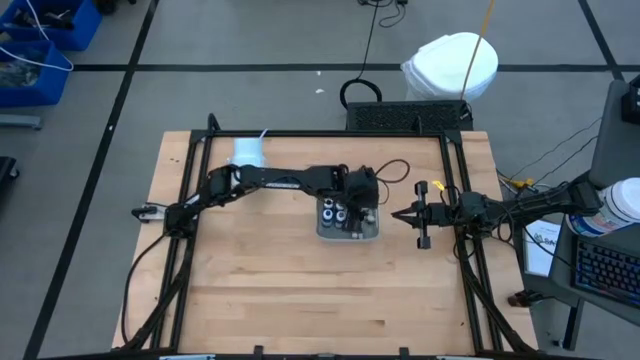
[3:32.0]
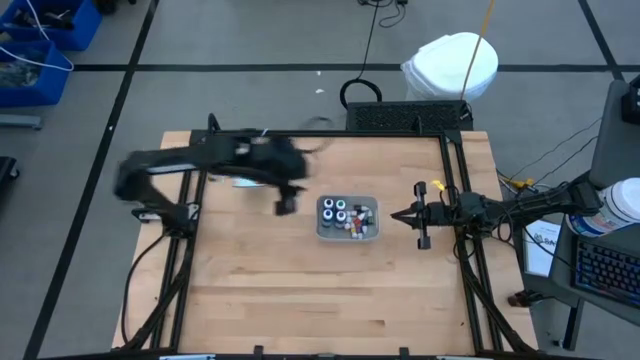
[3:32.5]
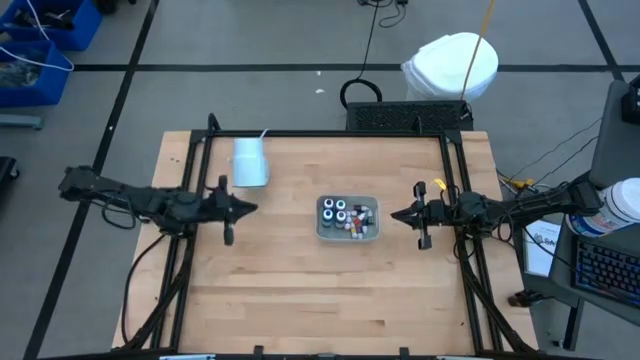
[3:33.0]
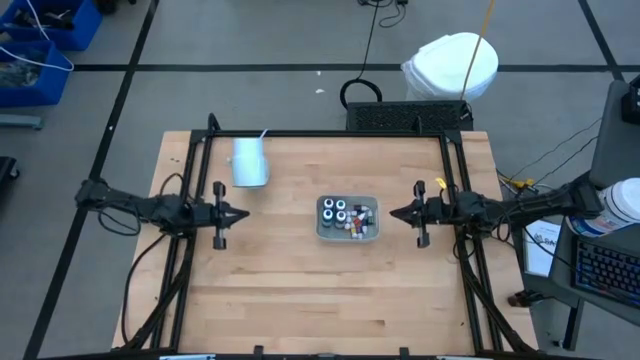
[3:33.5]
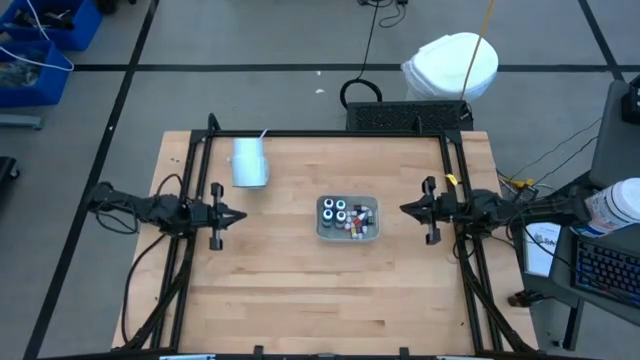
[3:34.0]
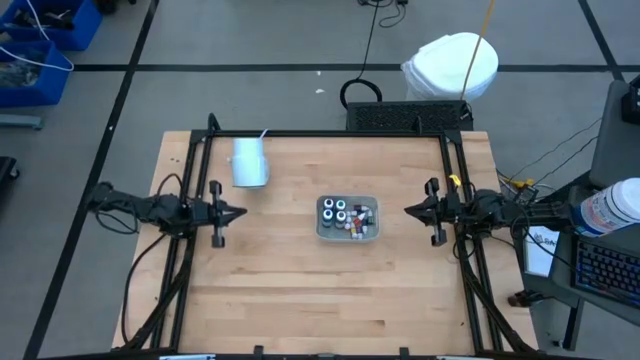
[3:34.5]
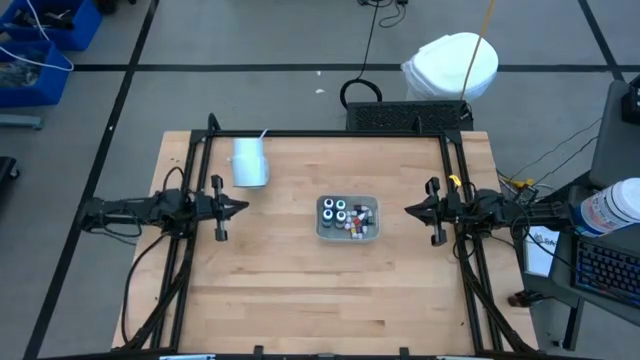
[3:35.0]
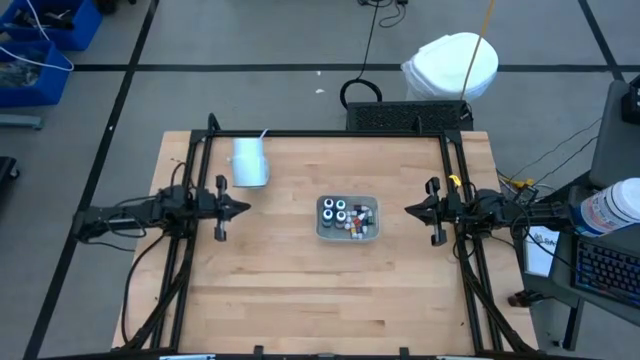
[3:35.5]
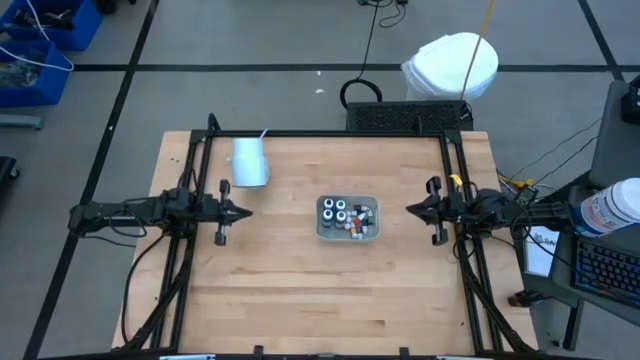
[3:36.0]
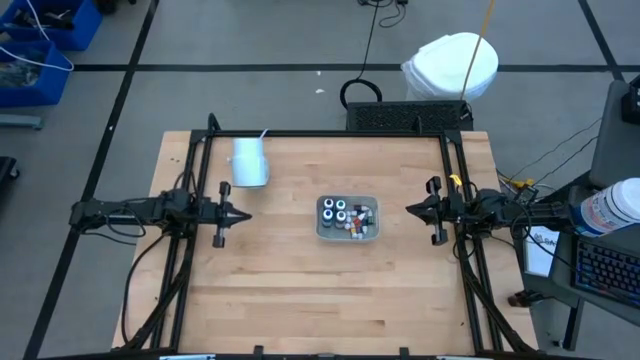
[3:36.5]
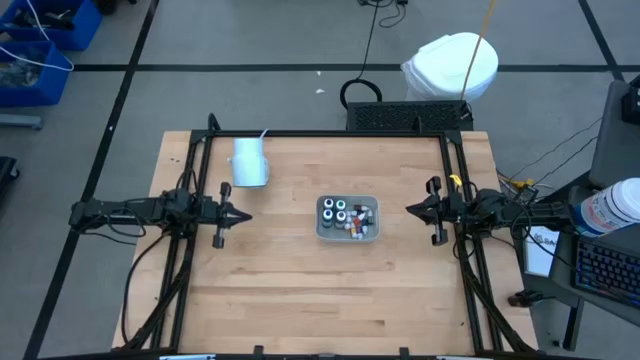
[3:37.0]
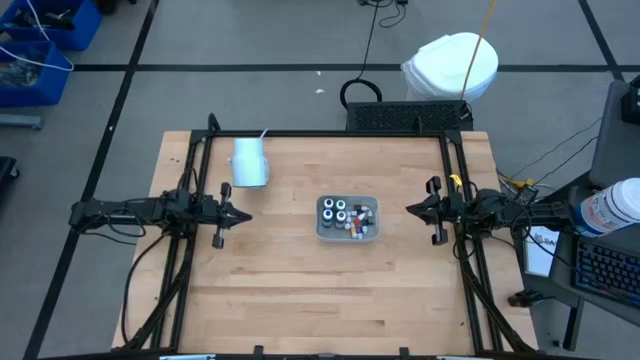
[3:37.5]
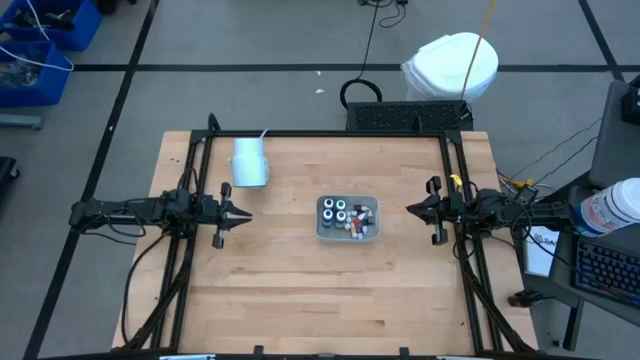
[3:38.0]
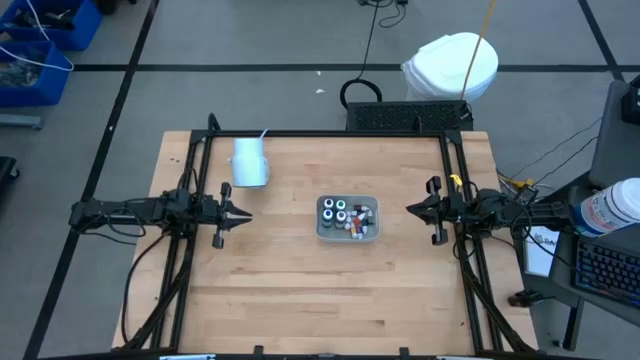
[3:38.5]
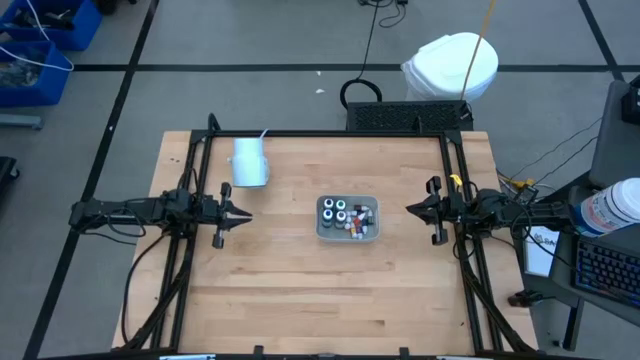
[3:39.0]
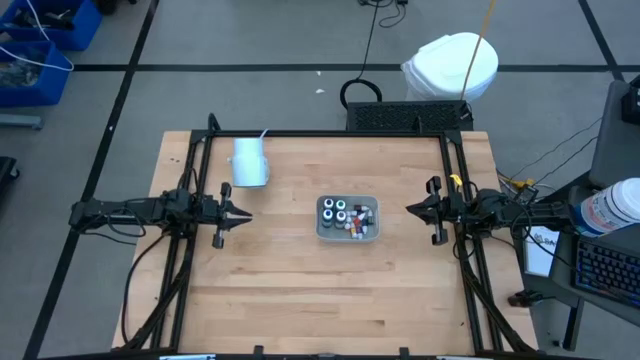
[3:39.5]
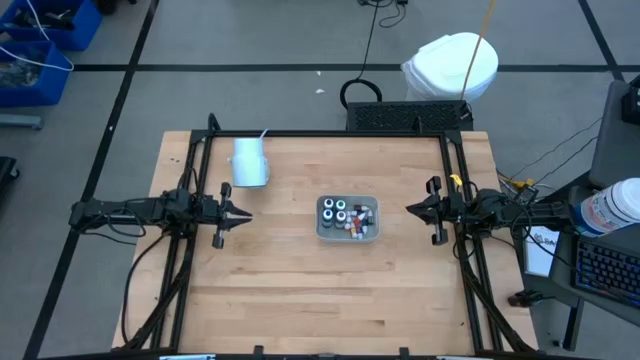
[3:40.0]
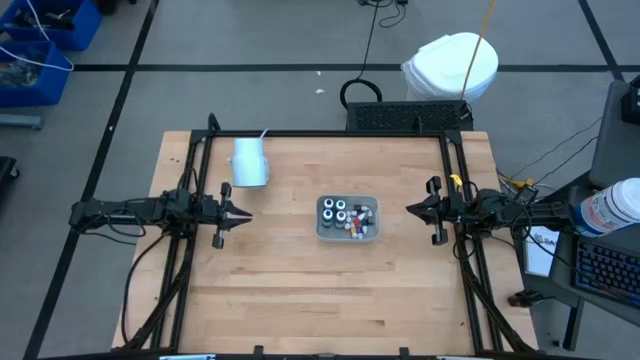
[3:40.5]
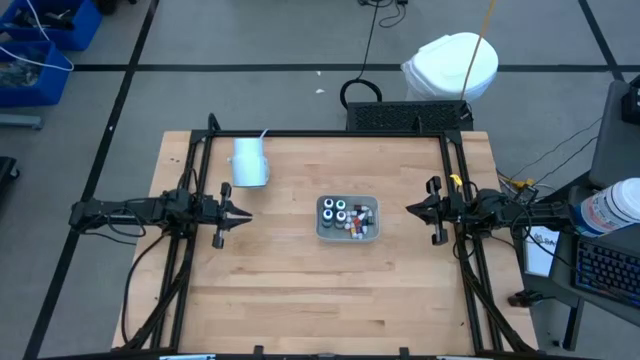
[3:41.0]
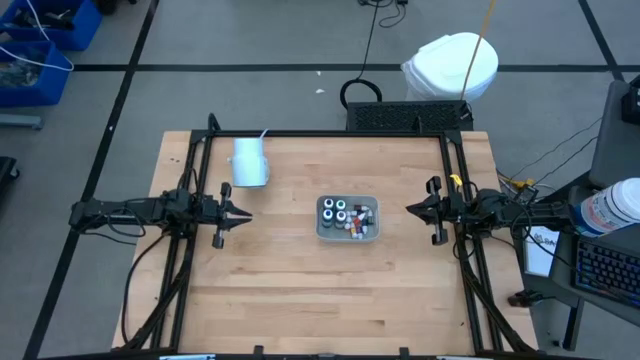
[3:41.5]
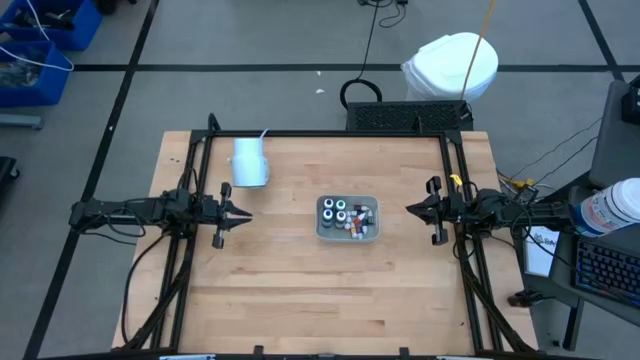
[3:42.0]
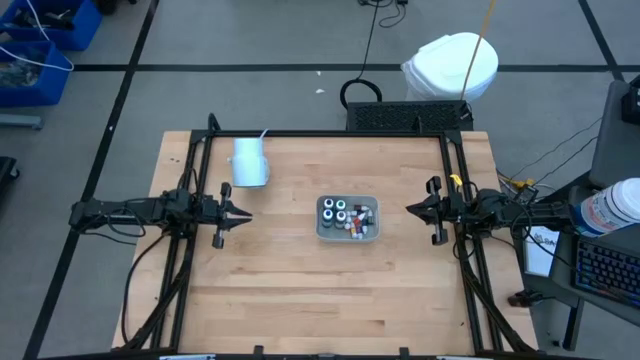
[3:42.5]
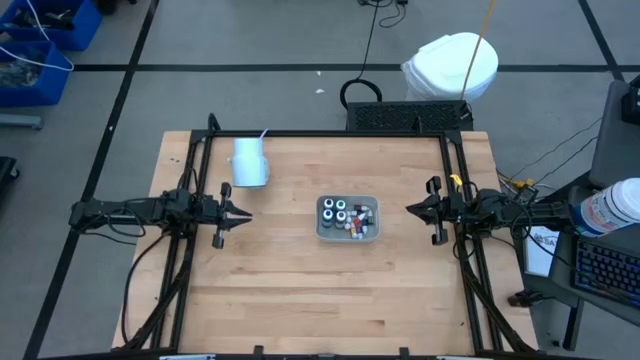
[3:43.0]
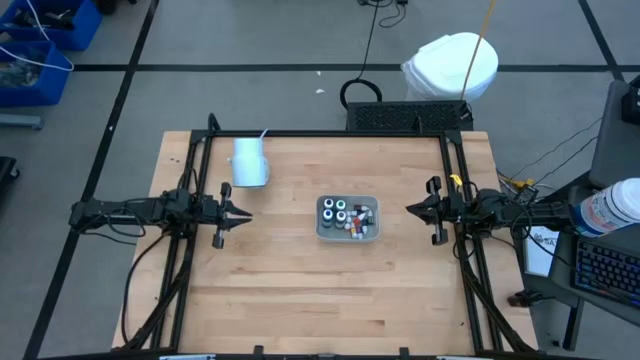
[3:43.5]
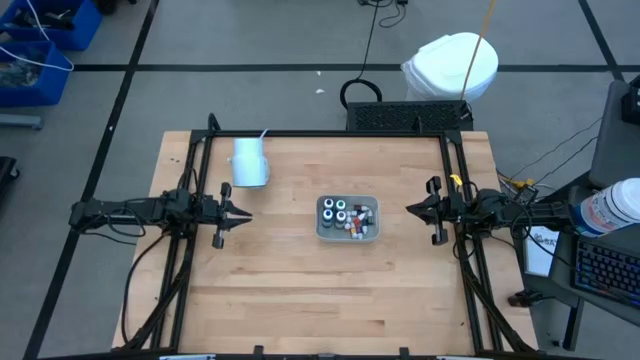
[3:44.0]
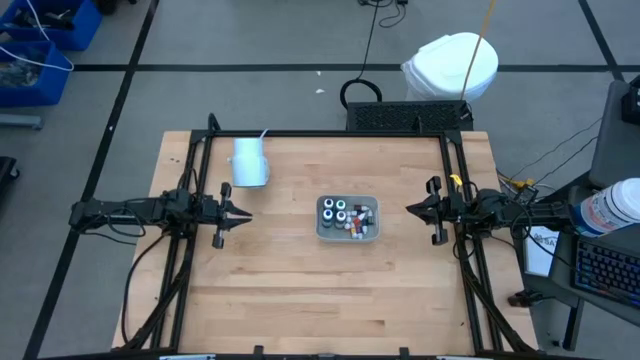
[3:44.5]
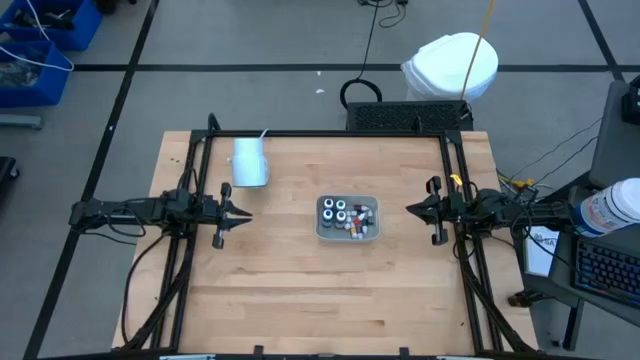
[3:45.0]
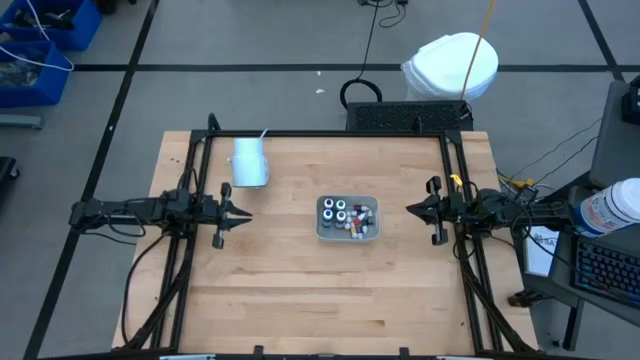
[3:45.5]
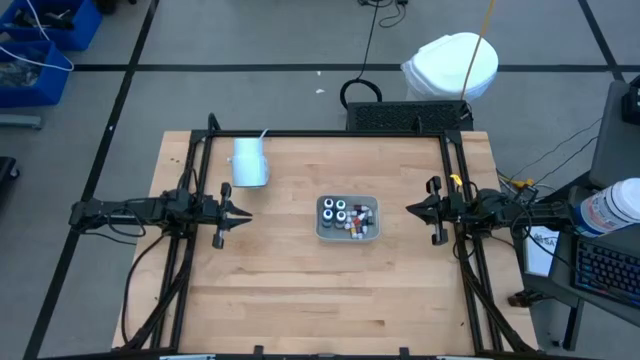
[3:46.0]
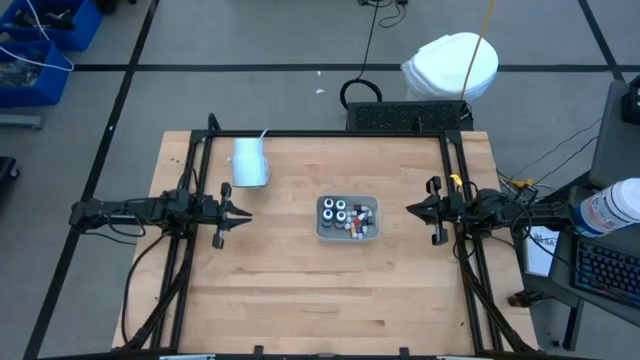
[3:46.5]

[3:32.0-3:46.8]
Task: Pick & Place food coloring
Return to Home Position

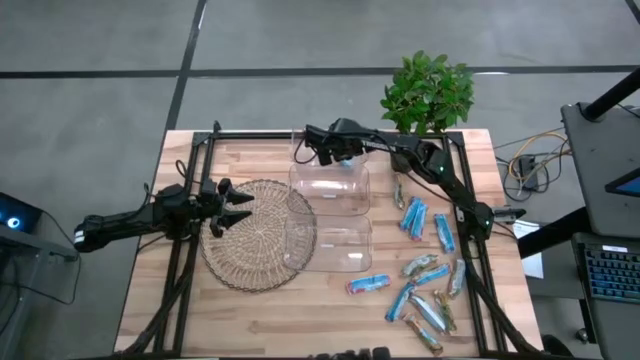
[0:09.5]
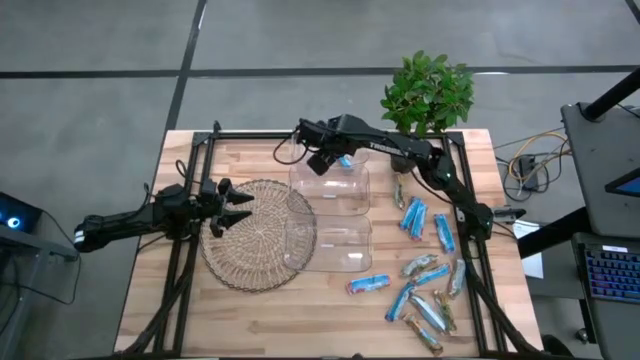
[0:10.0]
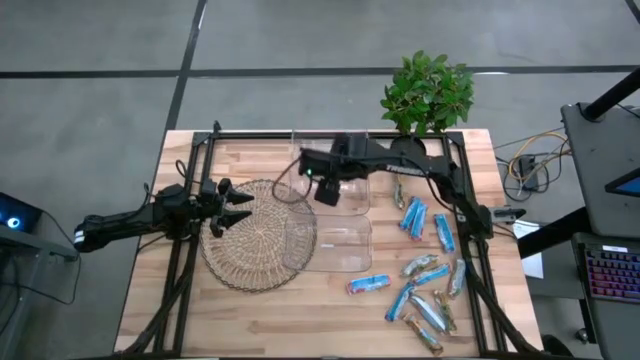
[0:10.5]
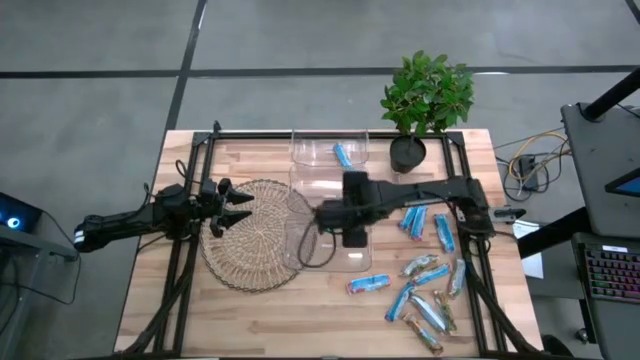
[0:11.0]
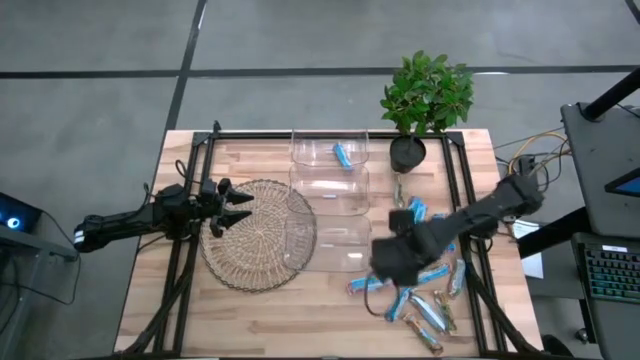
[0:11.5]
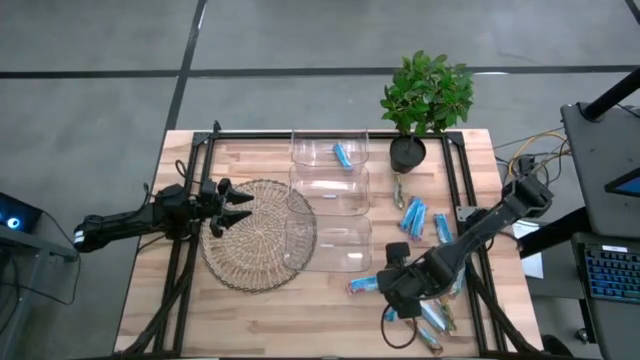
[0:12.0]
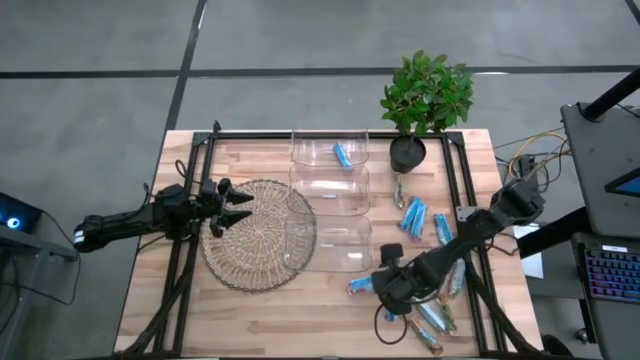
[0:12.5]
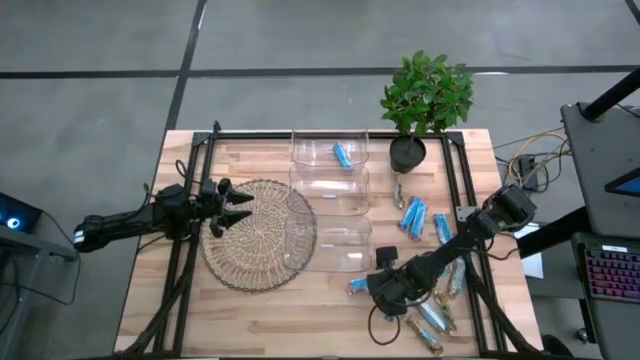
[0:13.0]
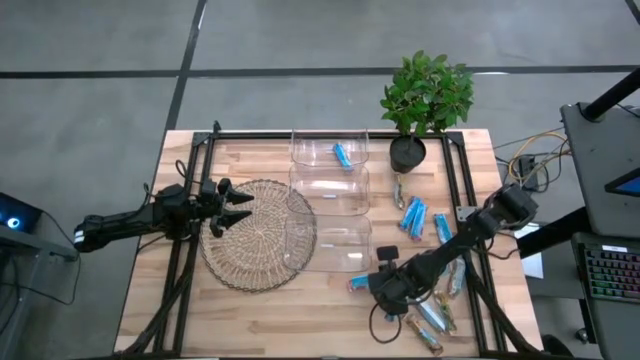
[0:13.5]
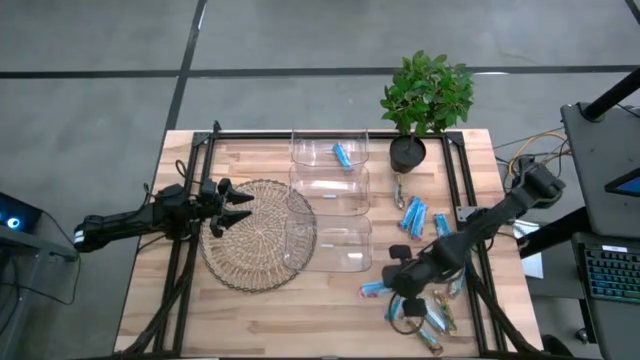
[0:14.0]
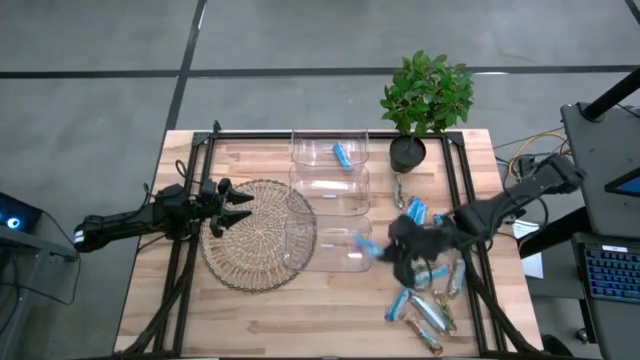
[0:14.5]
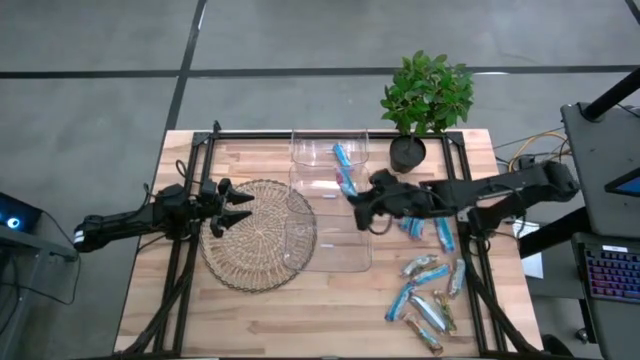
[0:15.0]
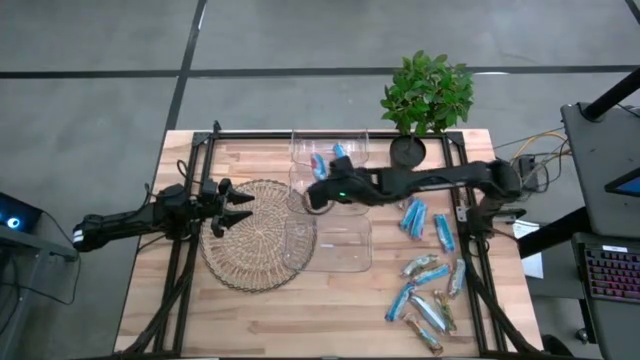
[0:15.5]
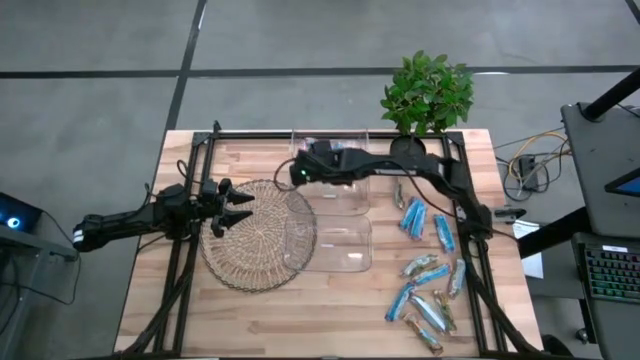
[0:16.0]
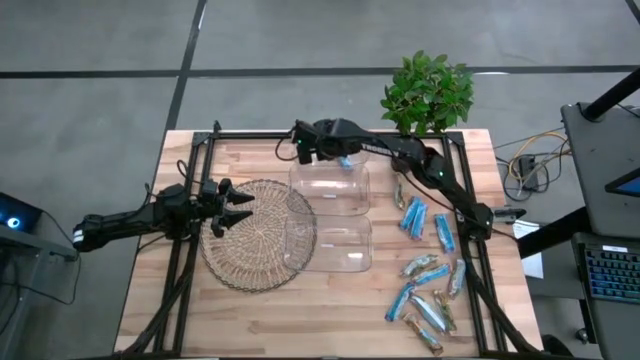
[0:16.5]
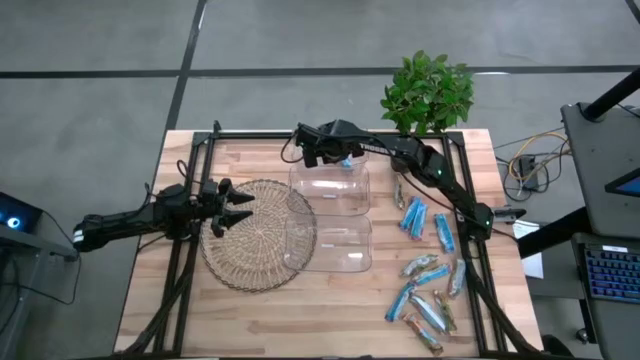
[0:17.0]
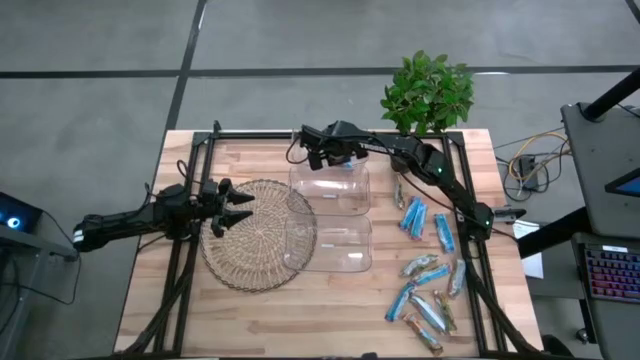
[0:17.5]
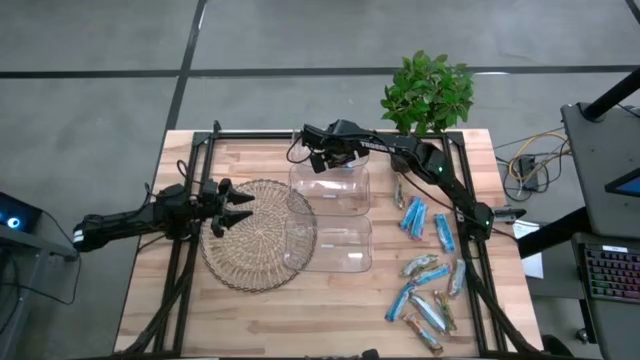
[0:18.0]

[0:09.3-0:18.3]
Task: Pick and place Granola Bars by type
Put the red granola bar into the top transparent bin
